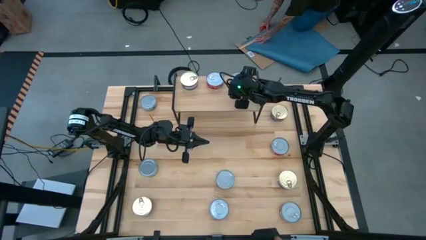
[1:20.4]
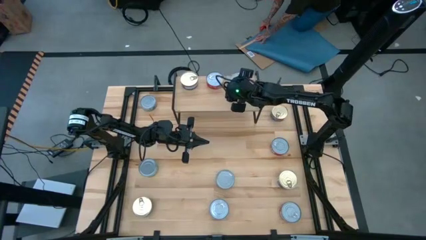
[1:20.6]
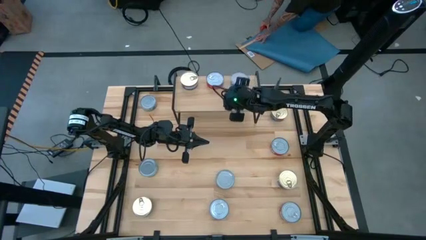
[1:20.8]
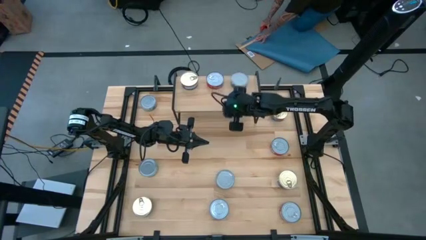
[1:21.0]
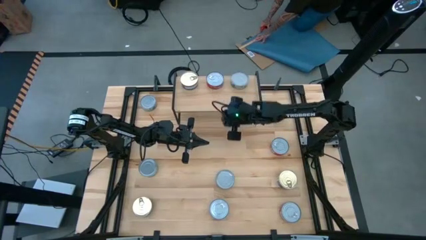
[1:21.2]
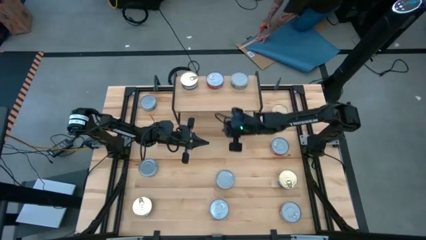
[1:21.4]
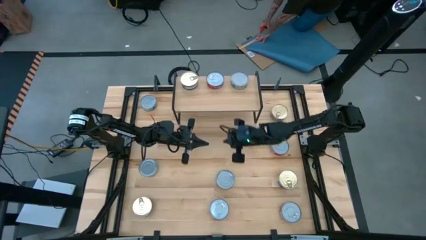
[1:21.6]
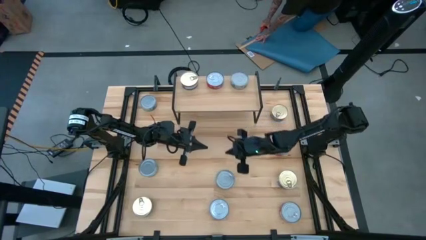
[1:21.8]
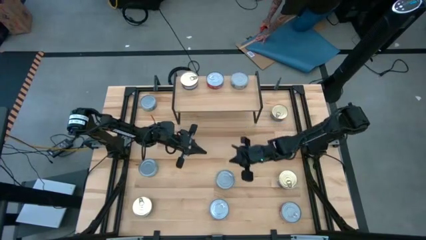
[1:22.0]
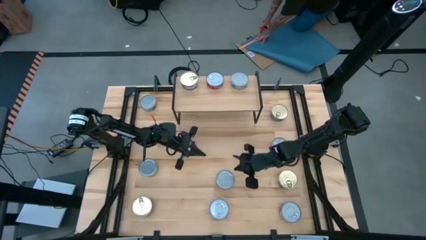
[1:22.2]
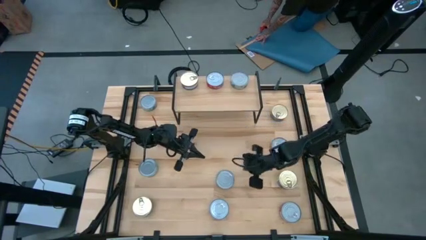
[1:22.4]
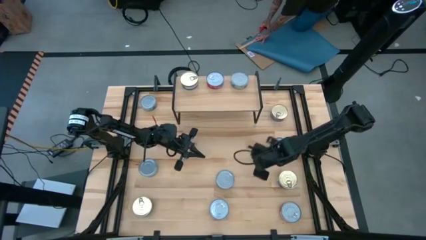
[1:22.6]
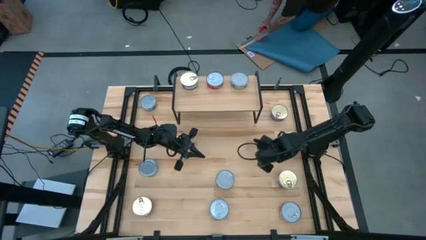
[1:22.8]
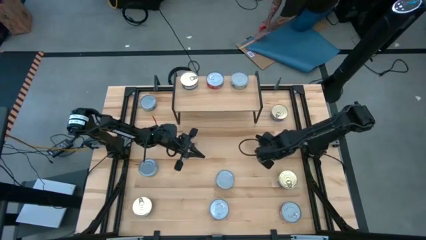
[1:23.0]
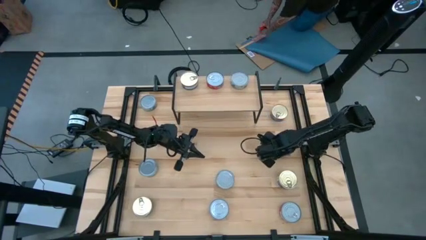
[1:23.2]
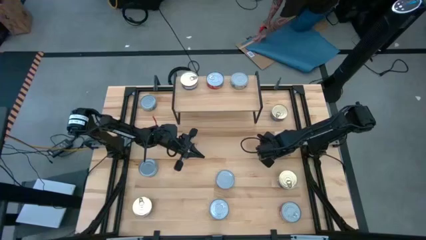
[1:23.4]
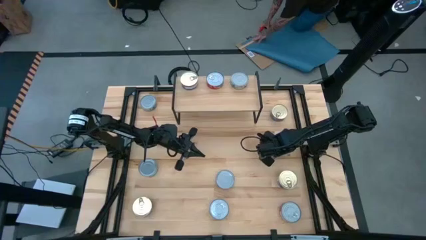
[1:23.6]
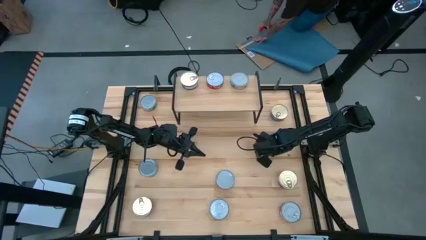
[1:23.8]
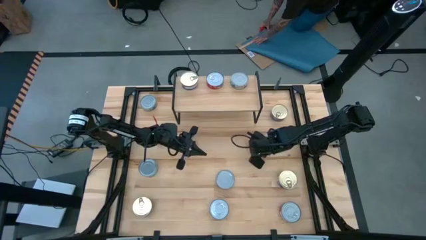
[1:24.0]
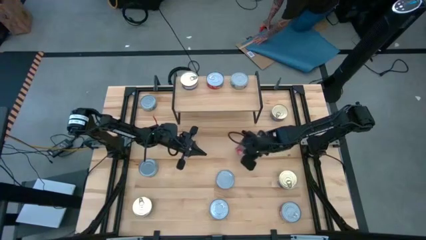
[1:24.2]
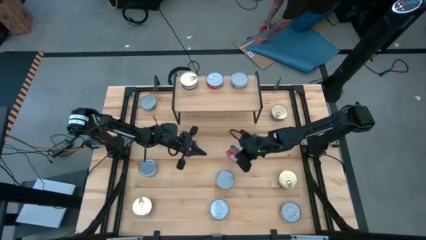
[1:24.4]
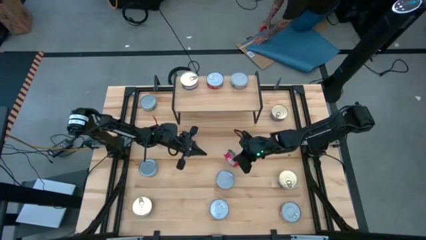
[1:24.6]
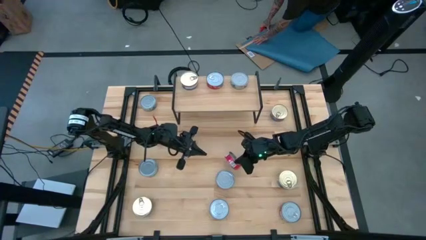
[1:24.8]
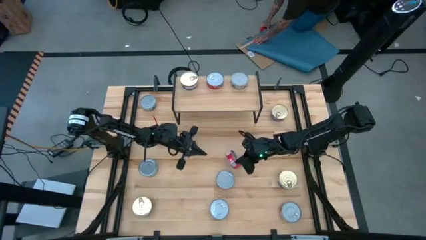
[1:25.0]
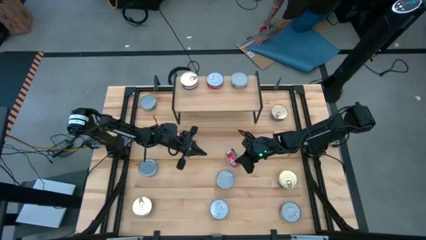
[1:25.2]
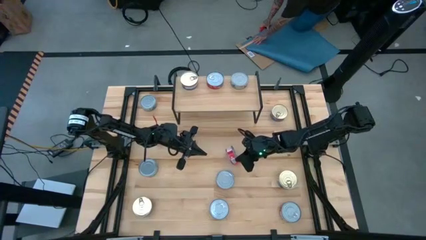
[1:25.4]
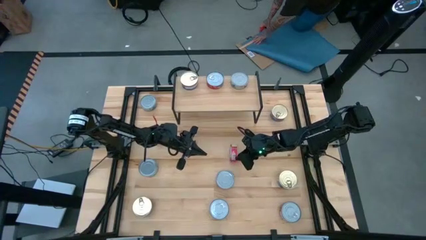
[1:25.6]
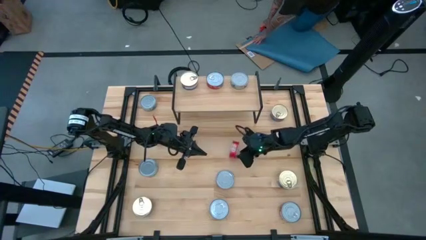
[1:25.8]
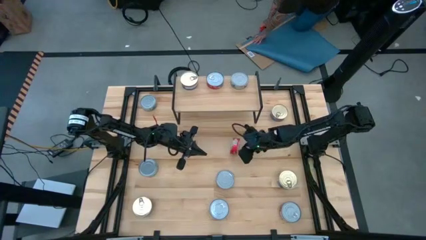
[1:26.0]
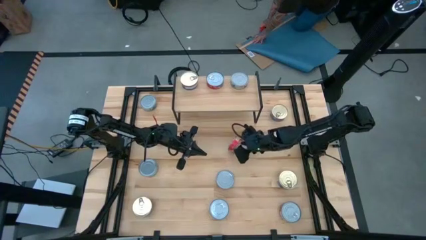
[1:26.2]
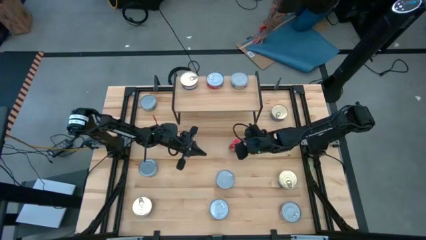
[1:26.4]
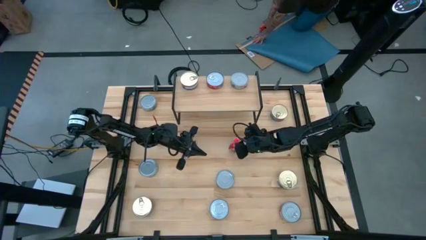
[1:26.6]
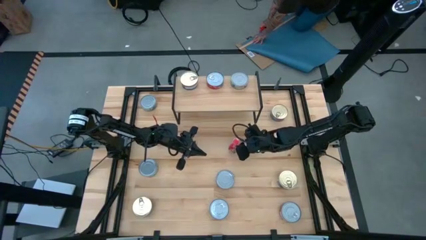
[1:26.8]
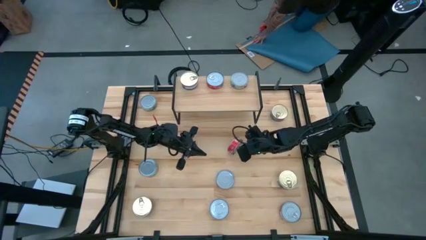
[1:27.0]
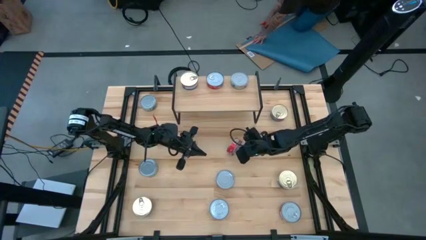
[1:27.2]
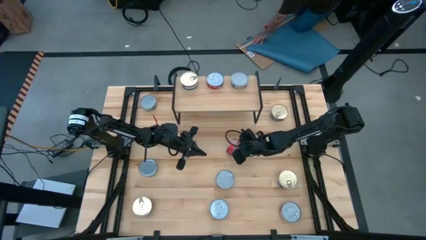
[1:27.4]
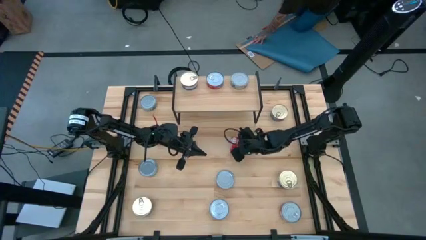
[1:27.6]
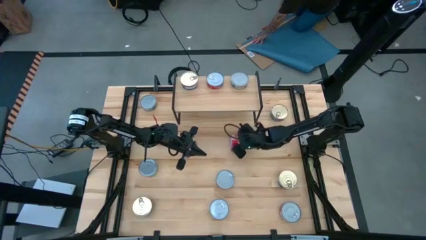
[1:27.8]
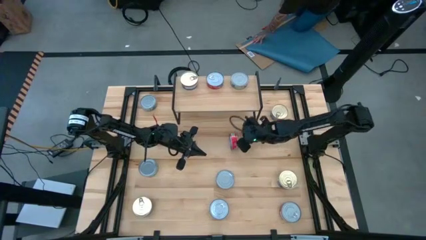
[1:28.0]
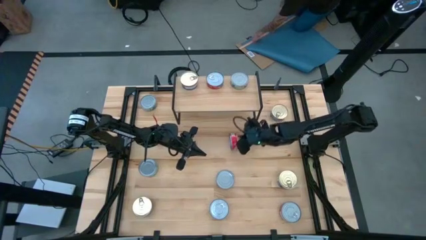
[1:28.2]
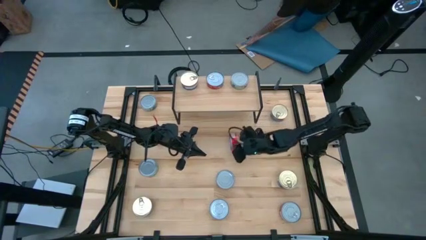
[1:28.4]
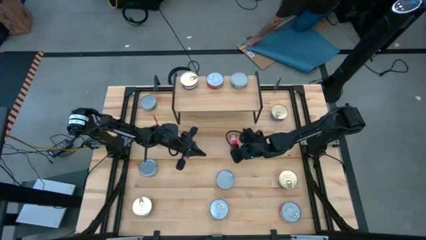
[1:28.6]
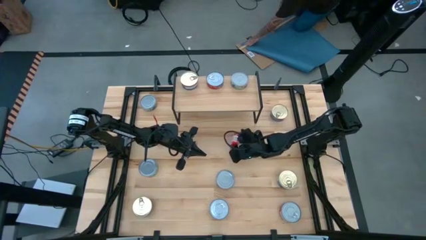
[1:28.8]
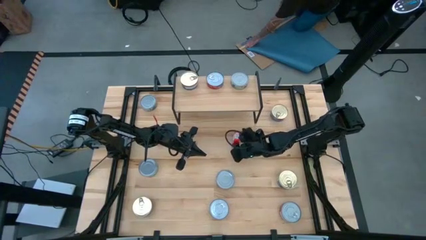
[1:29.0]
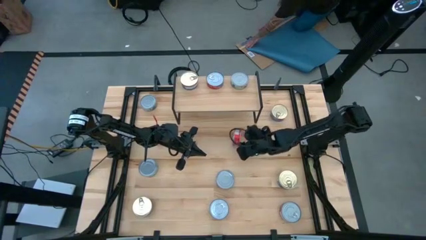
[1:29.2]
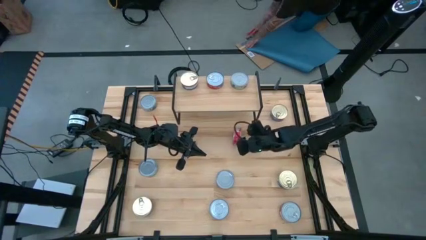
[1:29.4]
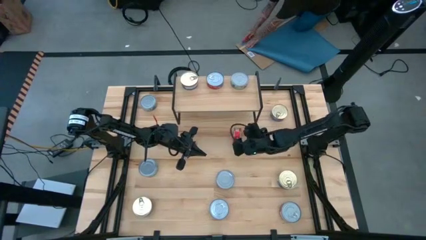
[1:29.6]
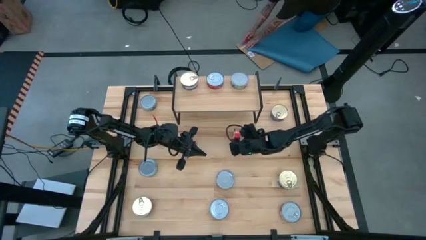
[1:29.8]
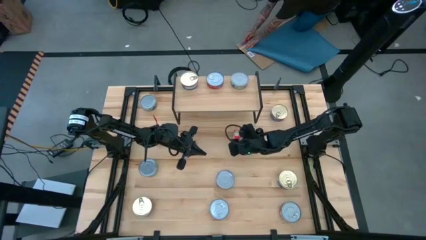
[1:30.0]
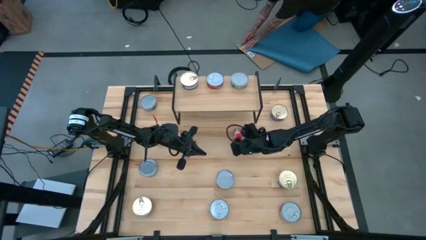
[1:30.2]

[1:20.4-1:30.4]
Task: Stack canned seafood by type on shelf
Stack the red tuna can on top of the other red tuna can on the shelf

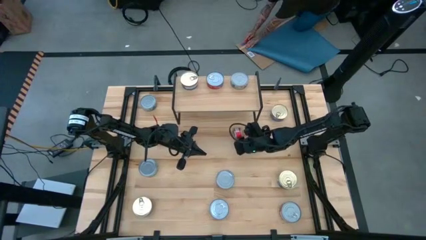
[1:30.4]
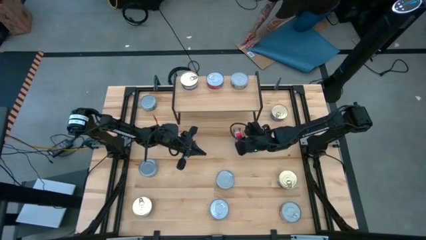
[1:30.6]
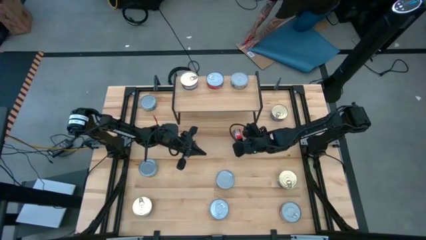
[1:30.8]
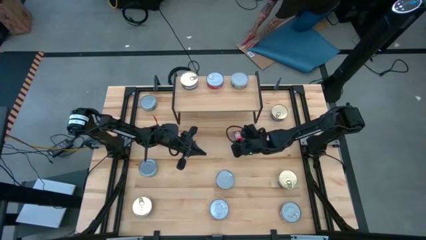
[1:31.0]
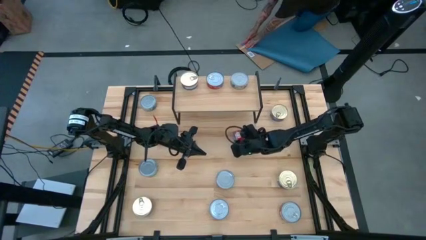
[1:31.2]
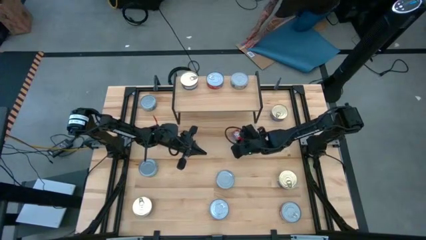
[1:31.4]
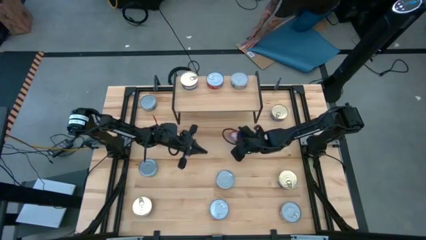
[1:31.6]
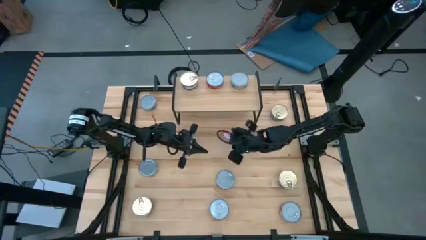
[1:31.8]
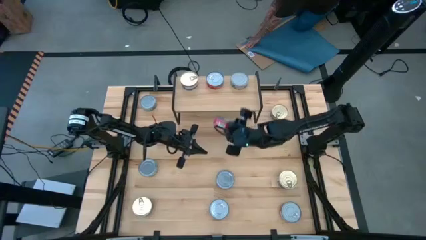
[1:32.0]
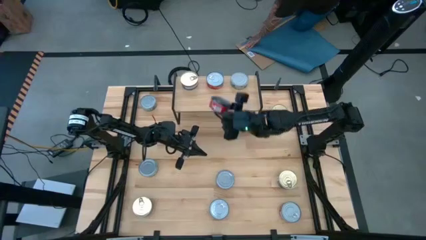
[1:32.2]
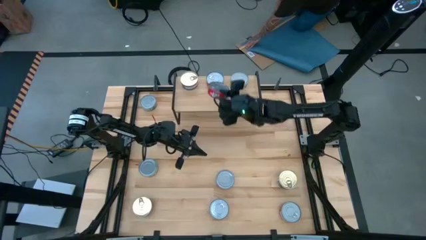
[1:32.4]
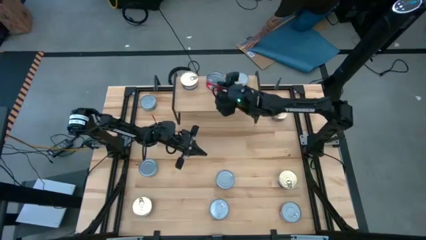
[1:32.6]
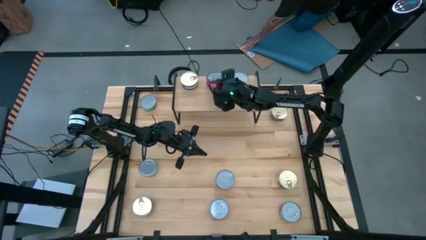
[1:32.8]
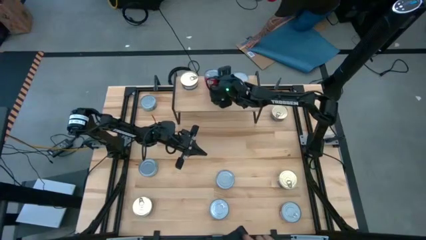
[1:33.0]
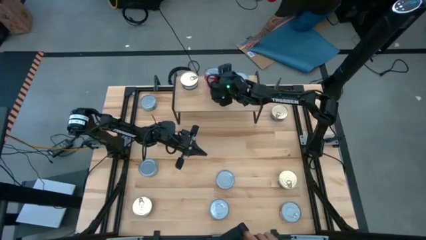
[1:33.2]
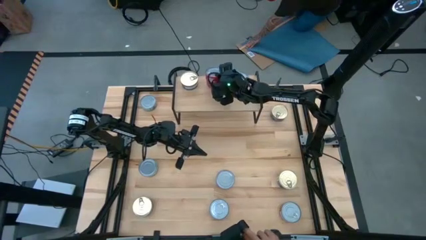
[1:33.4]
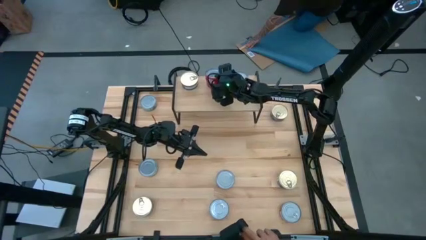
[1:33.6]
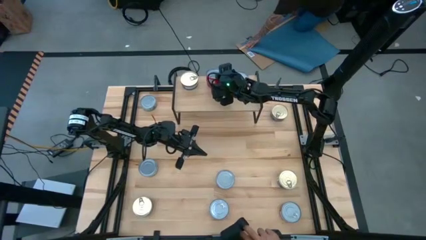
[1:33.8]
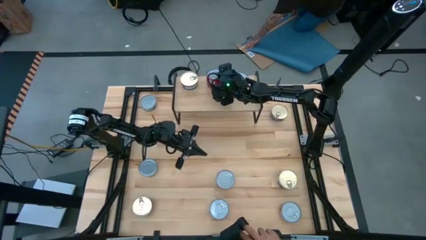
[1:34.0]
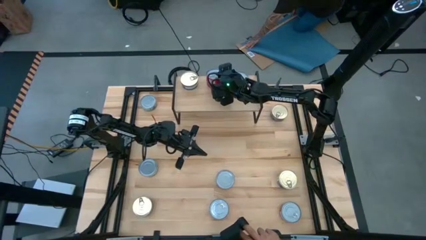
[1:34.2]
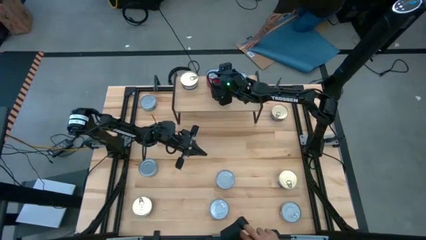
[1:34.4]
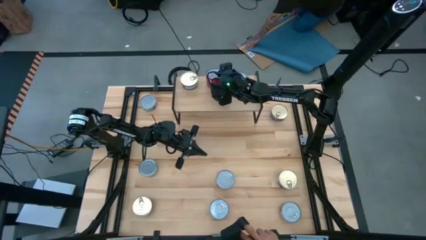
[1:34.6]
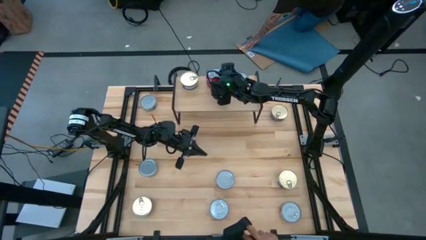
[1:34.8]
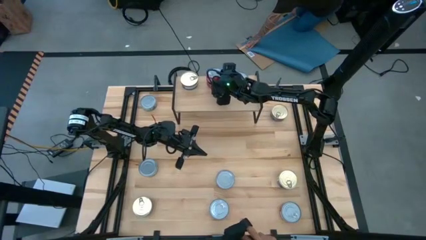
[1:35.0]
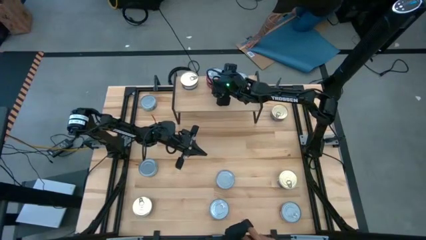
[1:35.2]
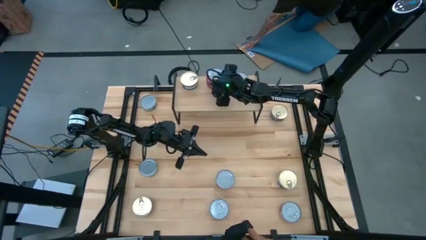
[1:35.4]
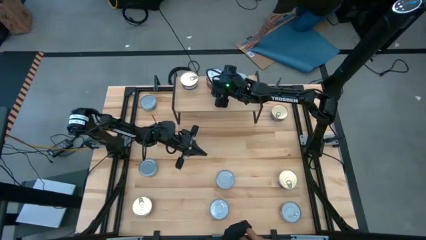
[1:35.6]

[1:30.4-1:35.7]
Stack the red tuna can on top of the other red tuna can on the shelf

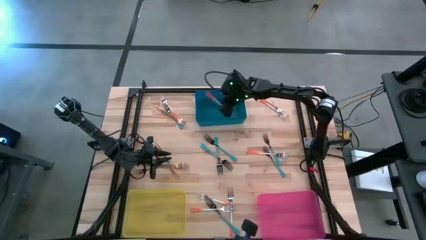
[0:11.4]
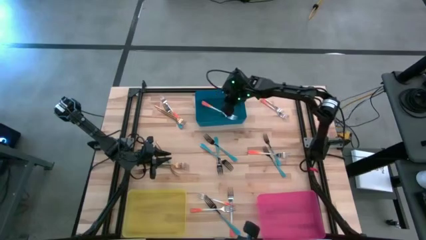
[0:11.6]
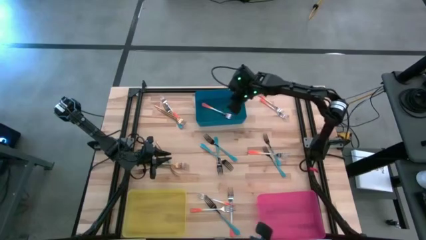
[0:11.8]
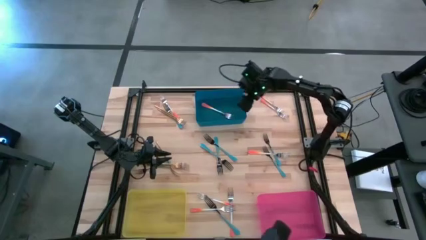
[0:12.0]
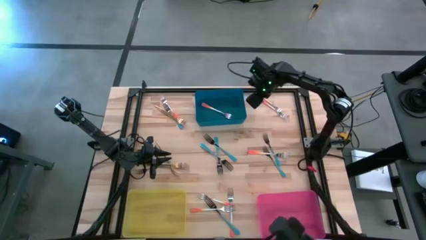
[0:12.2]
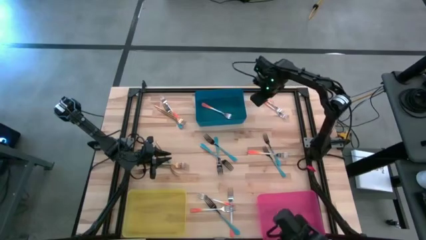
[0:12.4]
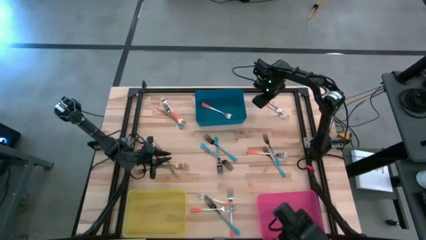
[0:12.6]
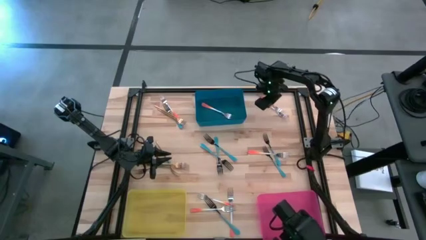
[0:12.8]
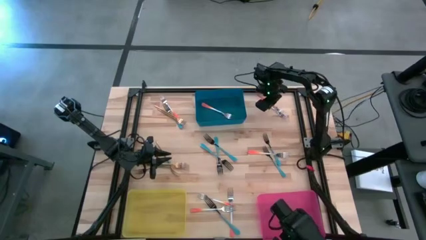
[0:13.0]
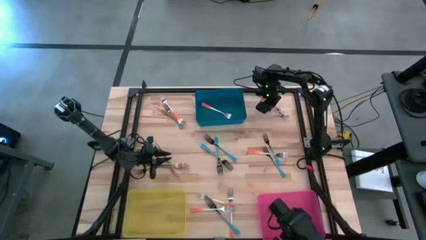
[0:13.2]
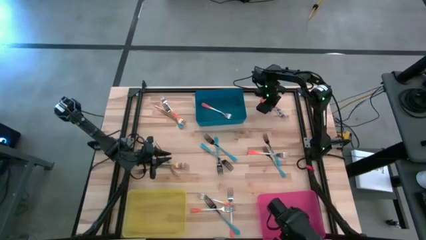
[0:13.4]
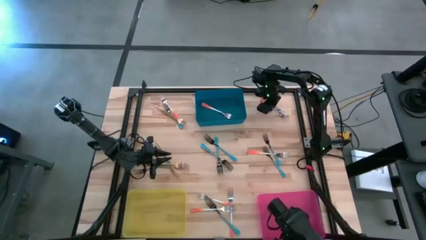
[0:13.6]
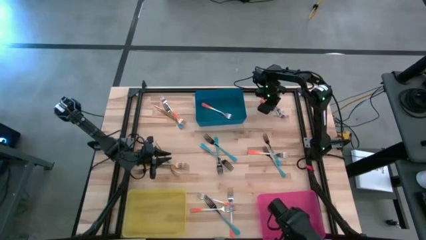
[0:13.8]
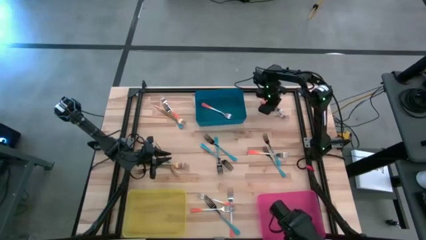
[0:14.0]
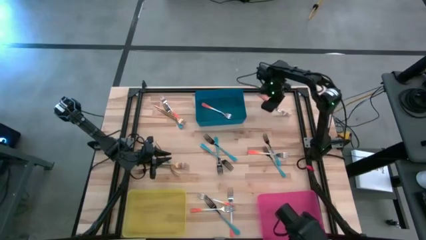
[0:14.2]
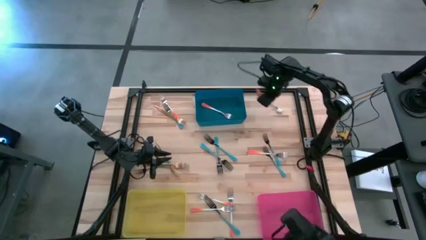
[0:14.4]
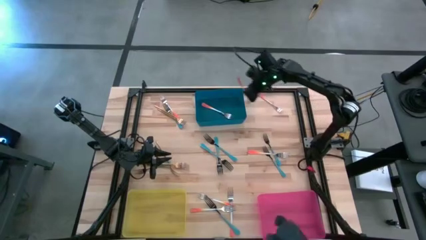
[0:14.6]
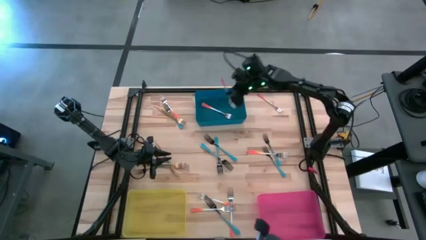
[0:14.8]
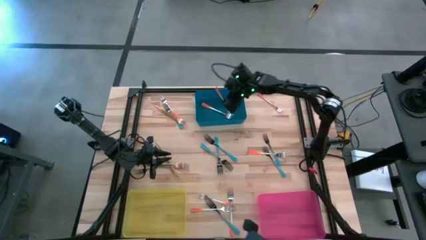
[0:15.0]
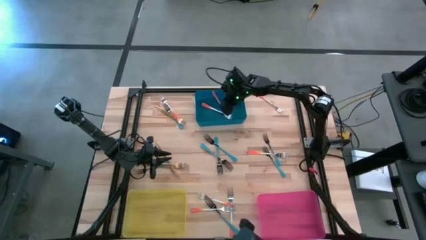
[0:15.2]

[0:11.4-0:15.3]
Task: Sort silverware by color (type)
Put the orange fork into the blue bin
